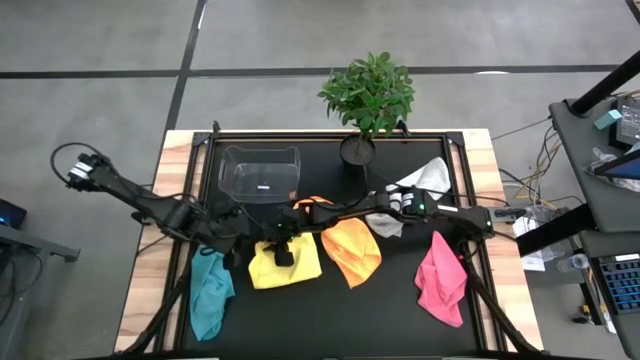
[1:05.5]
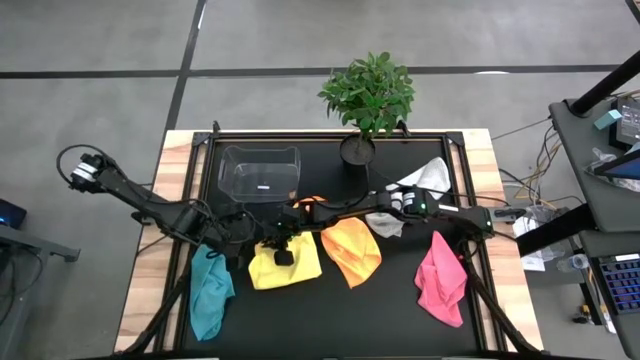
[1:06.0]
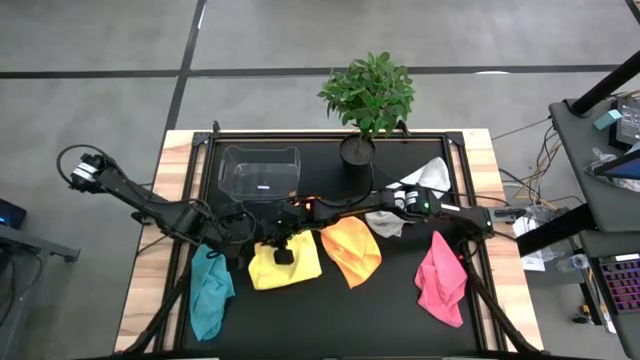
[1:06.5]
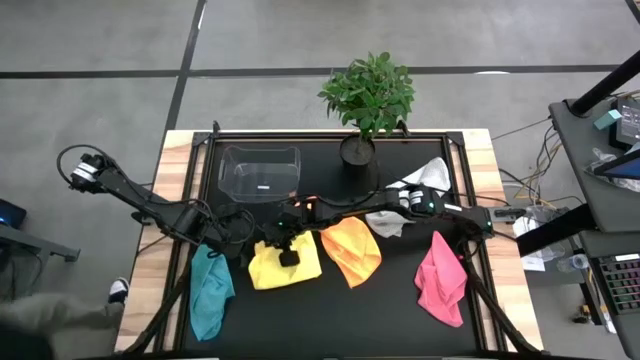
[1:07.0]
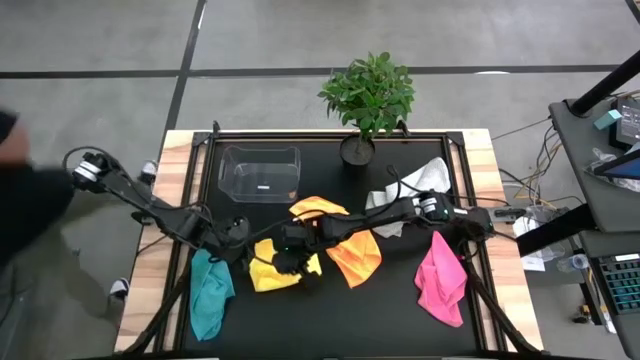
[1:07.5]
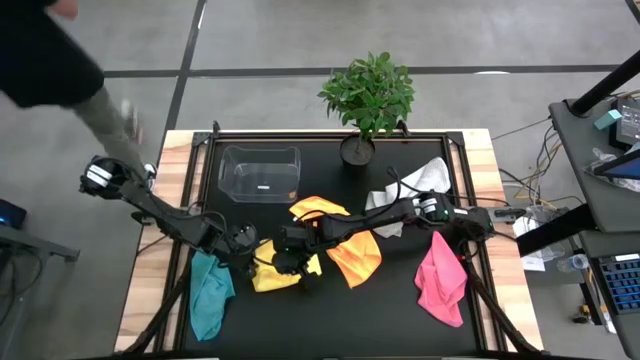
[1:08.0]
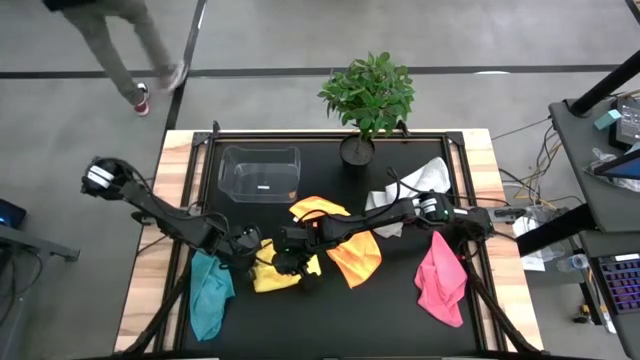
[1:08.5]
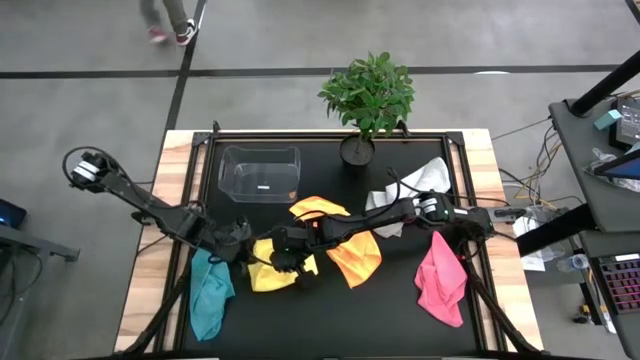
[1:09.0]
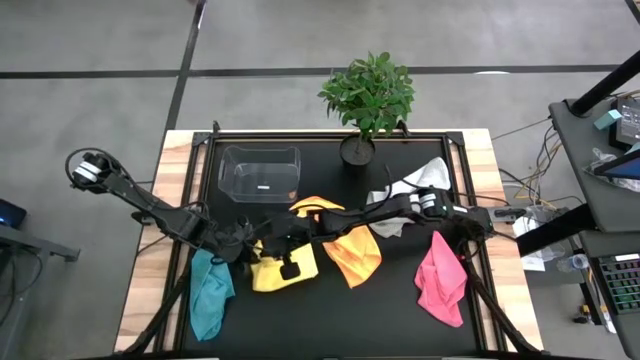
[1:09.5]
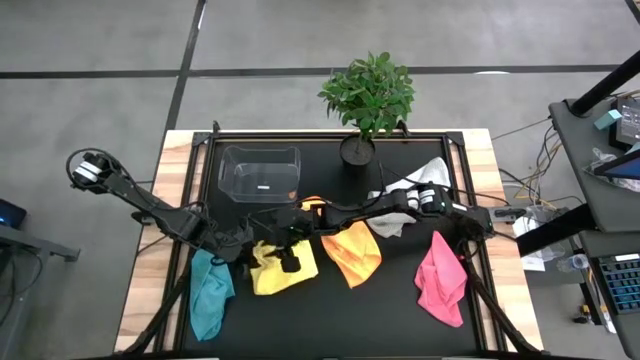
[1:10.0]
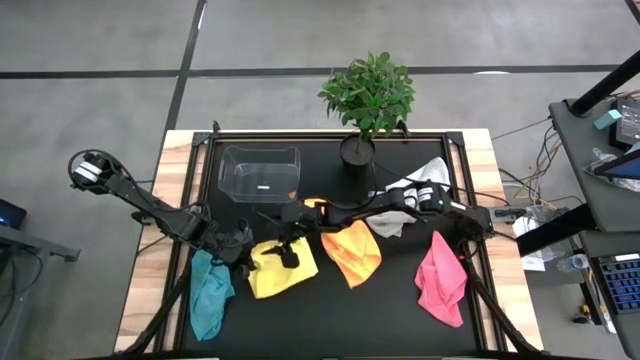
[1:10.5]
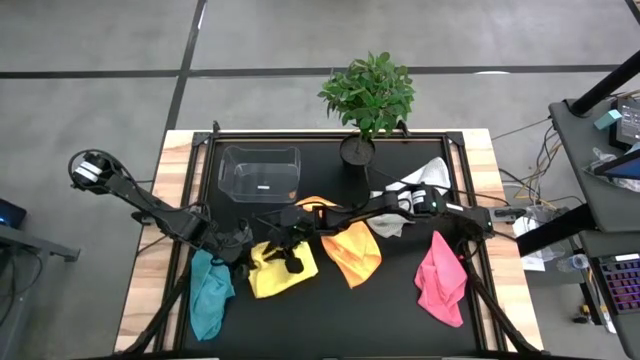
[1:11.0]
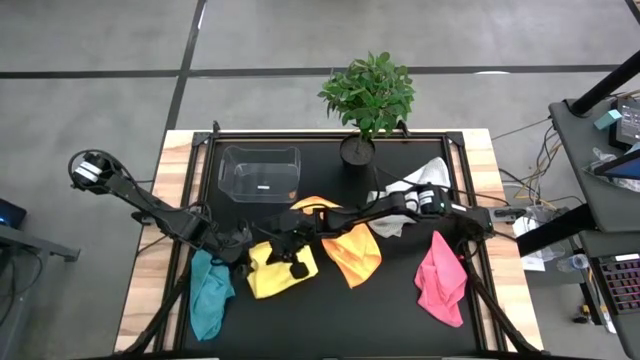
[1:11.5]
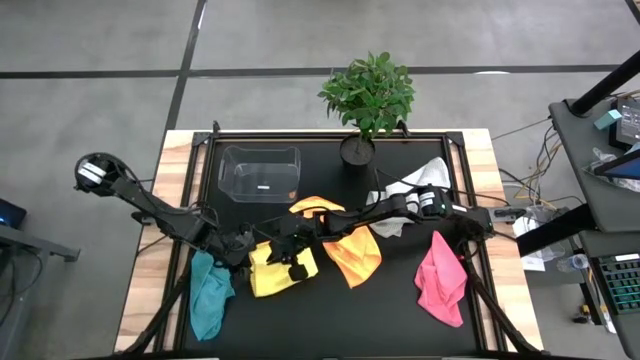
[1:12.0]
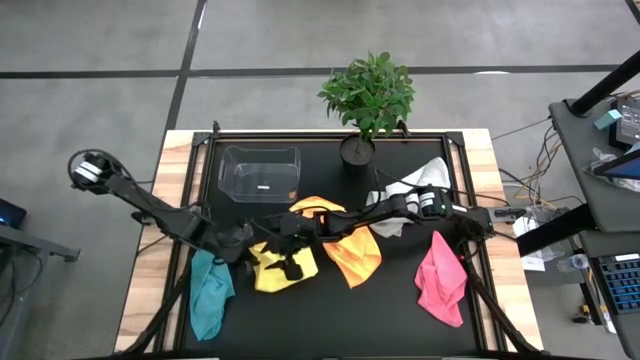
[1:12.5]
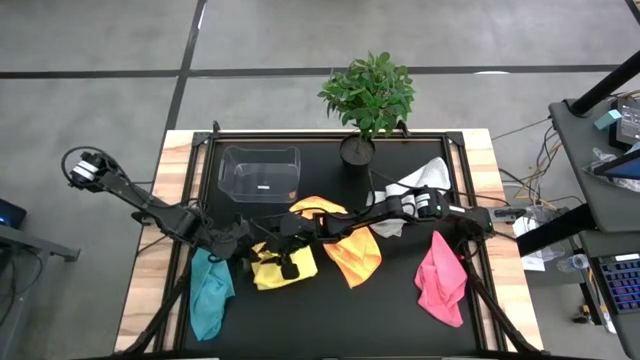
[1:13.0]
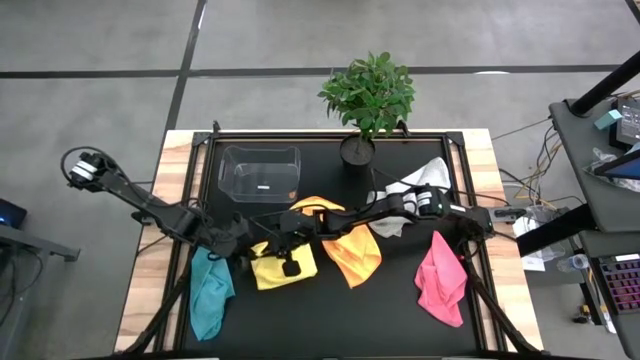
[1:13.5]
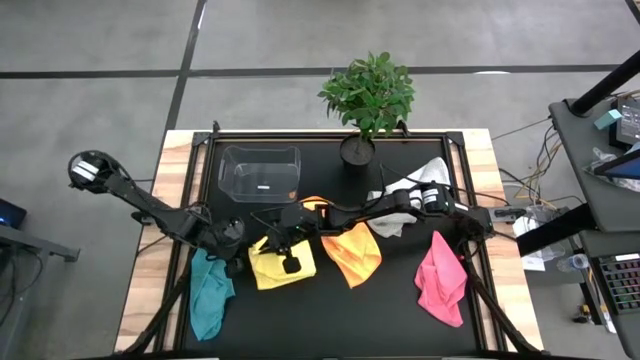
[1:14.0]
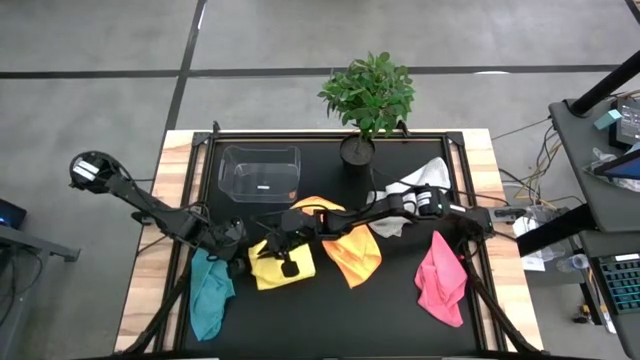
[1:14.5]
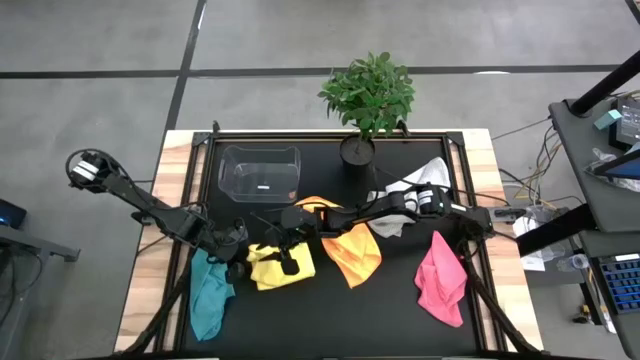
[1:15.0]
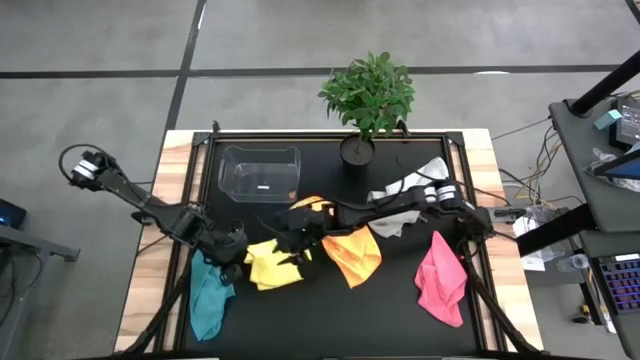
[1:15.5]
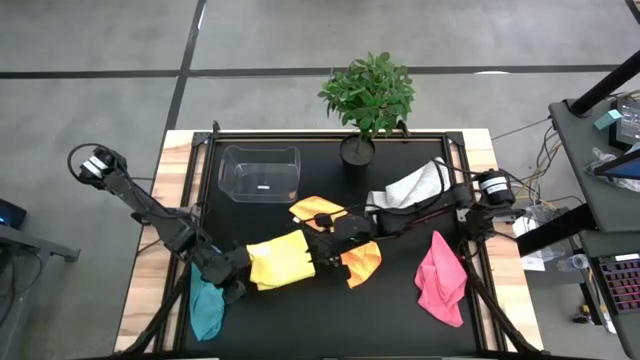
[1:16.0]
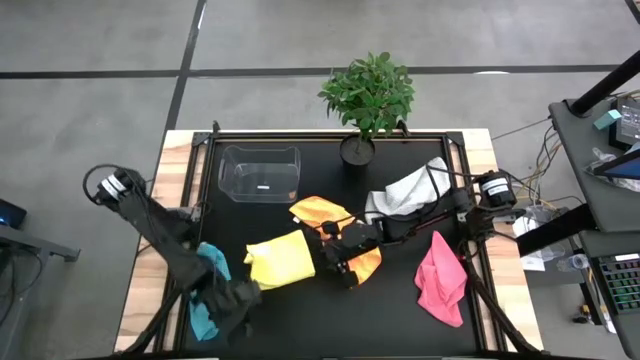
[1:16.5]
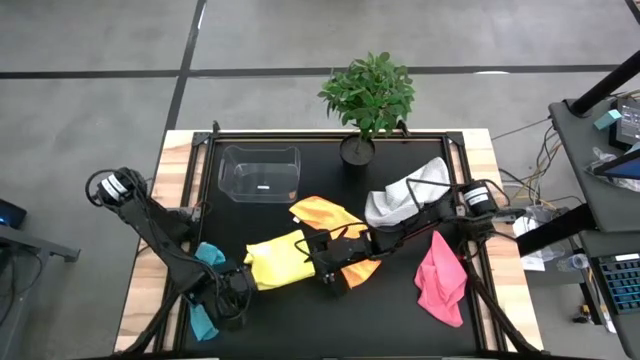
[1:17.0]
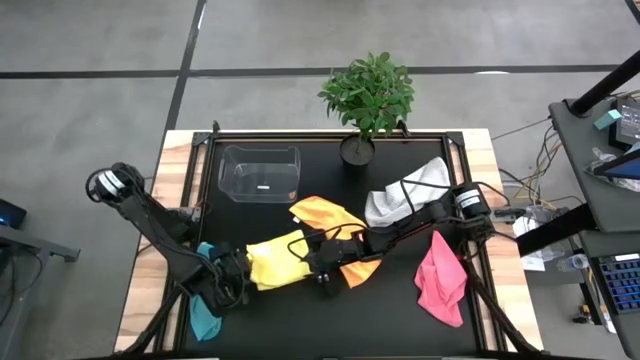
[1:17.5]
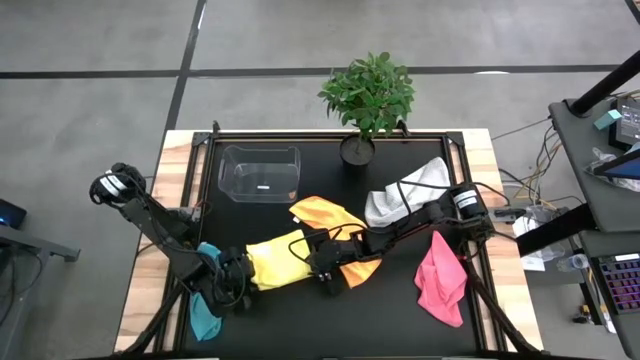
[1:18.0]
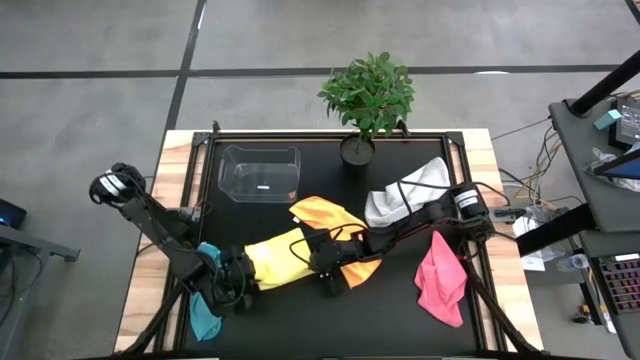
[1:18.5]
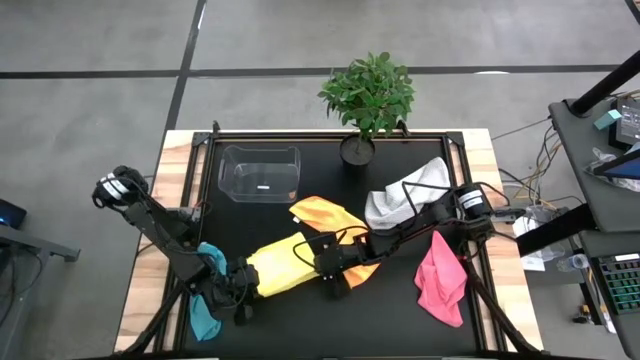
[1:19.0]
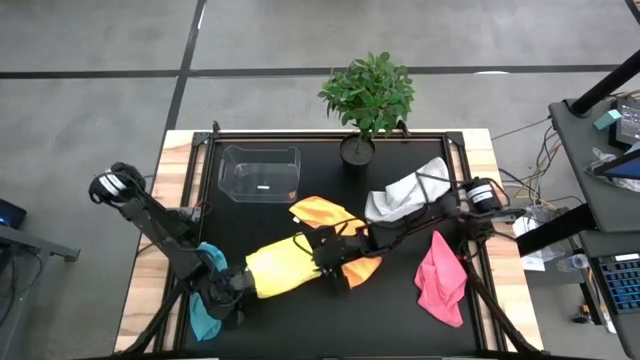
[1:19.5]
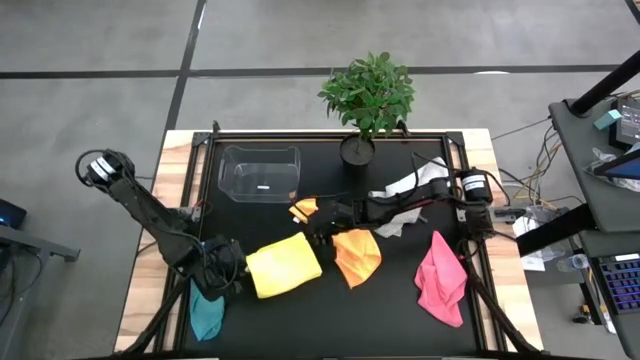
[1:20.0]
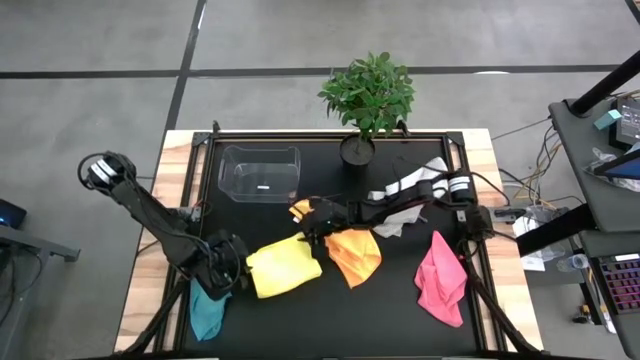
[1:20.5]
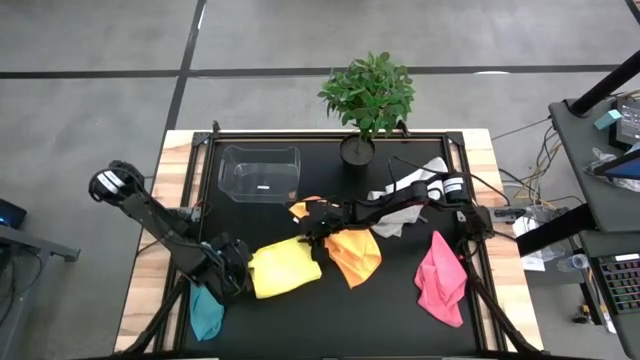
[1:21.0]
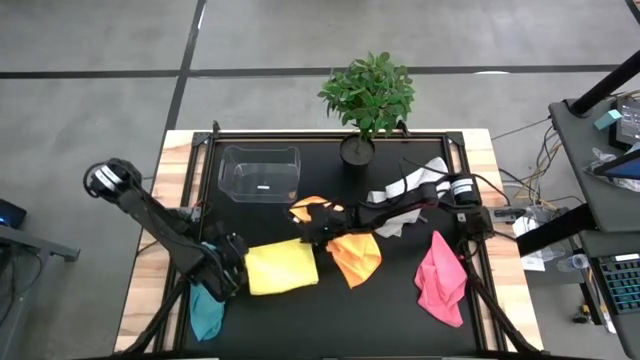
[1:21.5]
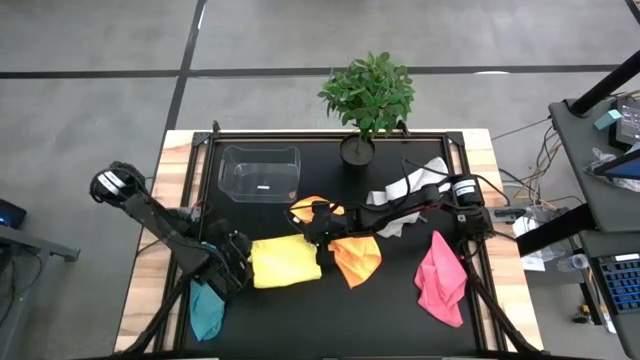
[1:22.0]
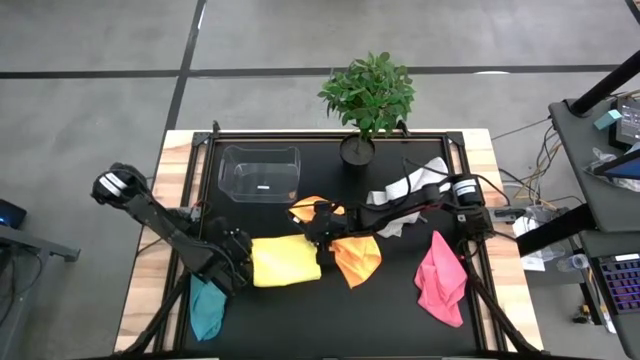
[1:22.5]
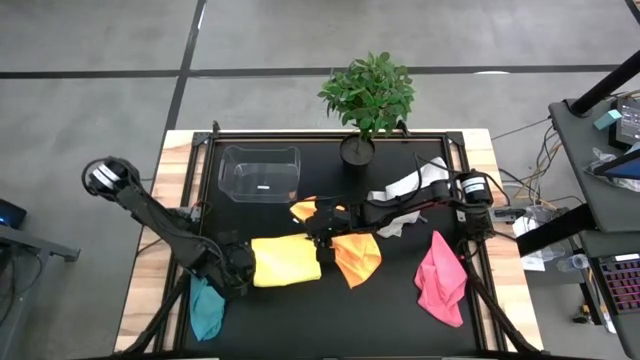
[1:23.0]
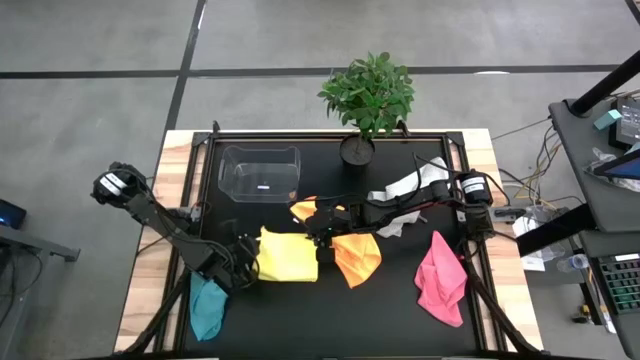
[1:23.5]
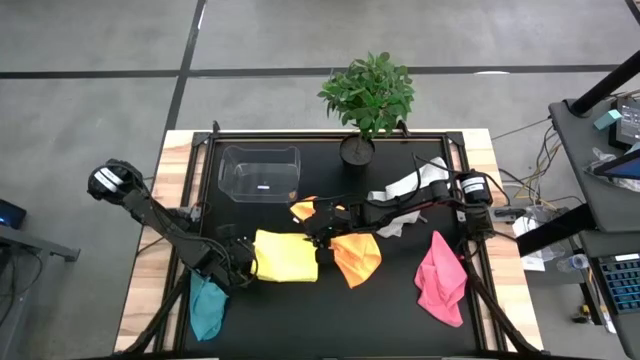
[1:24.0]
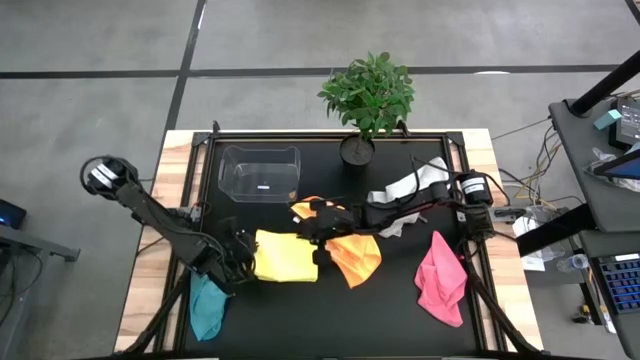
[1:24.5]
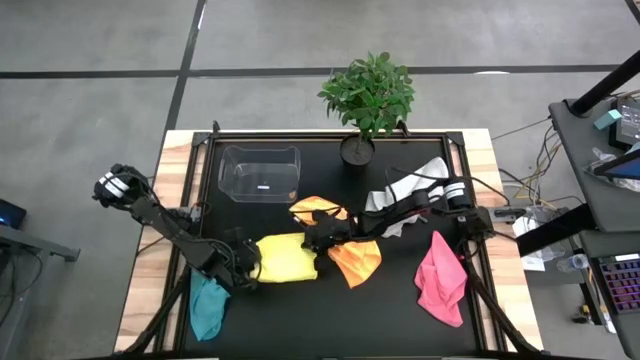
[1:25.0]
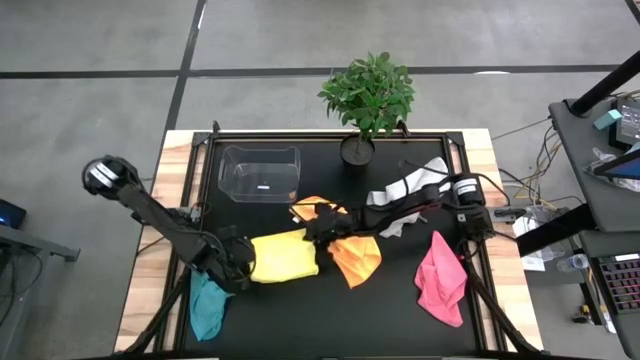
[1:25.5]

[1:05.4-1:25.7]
Task: Fold microfiber towels
Fold the yellow towel
